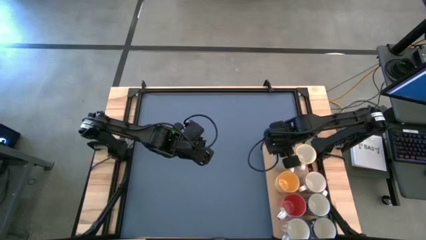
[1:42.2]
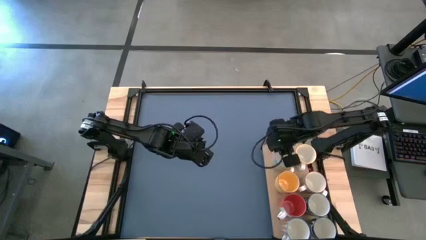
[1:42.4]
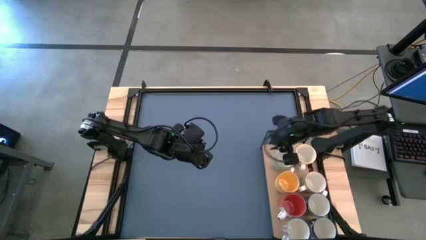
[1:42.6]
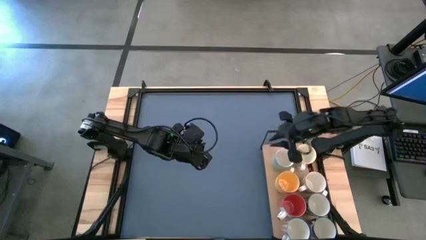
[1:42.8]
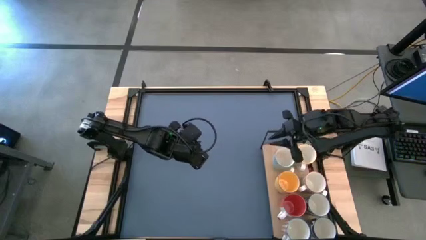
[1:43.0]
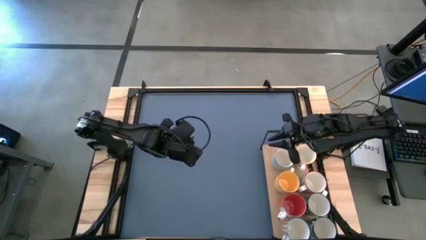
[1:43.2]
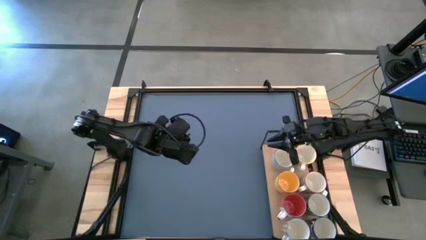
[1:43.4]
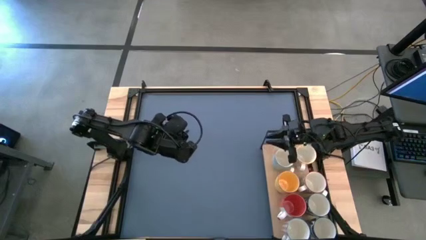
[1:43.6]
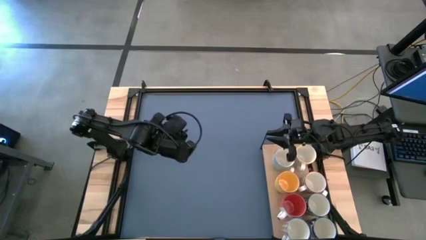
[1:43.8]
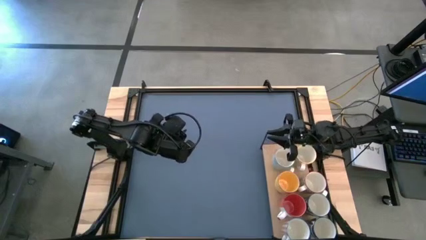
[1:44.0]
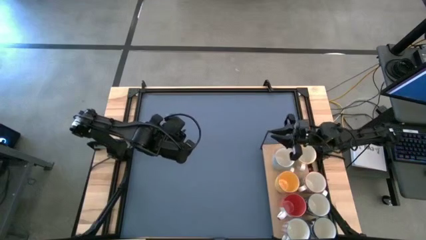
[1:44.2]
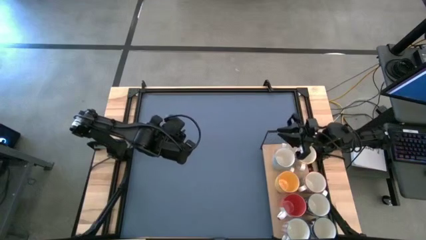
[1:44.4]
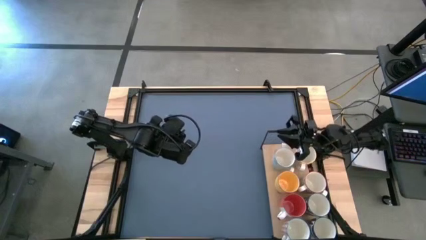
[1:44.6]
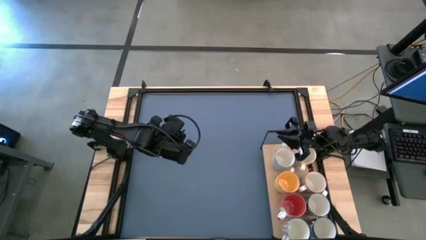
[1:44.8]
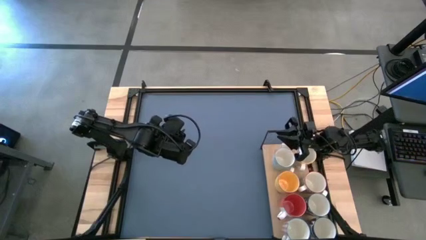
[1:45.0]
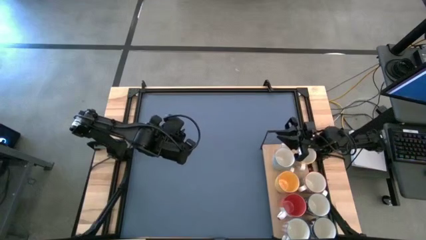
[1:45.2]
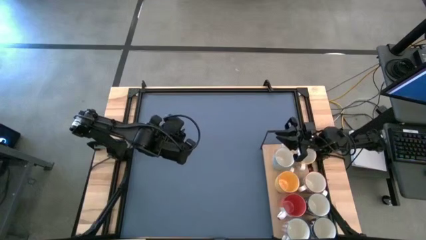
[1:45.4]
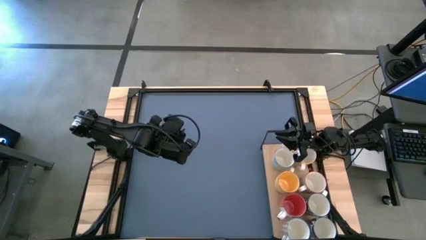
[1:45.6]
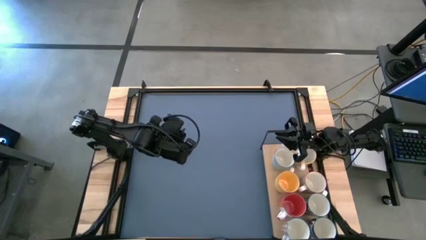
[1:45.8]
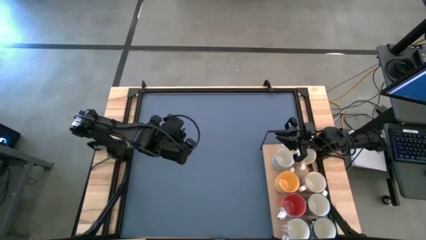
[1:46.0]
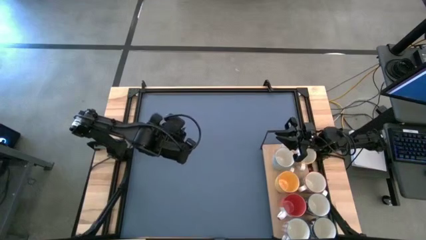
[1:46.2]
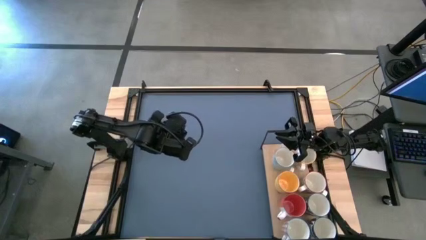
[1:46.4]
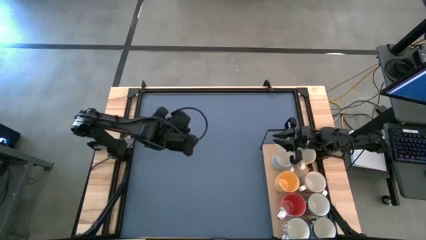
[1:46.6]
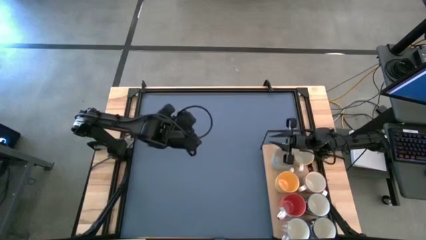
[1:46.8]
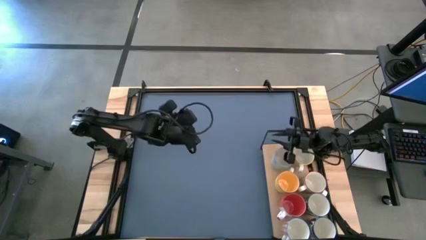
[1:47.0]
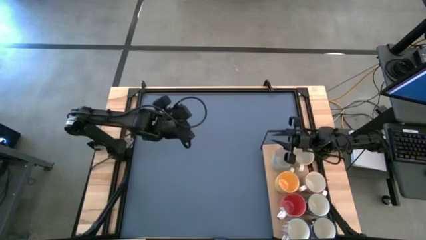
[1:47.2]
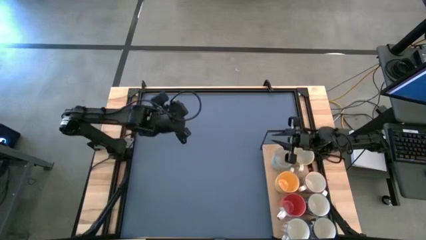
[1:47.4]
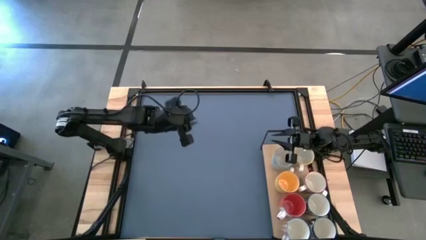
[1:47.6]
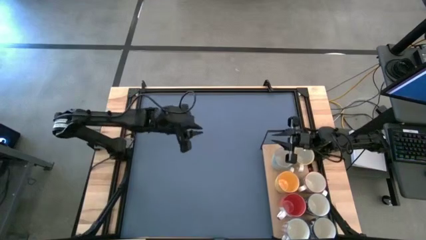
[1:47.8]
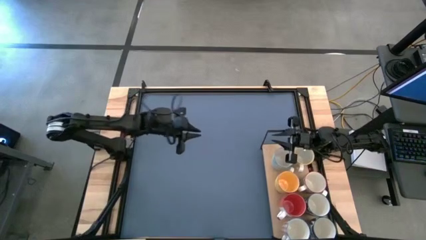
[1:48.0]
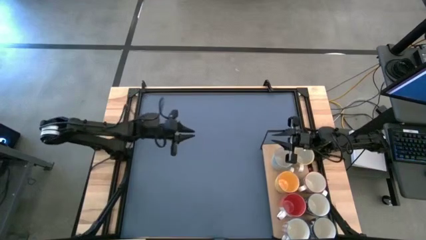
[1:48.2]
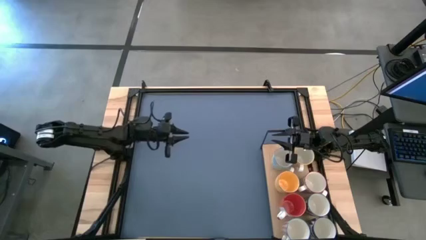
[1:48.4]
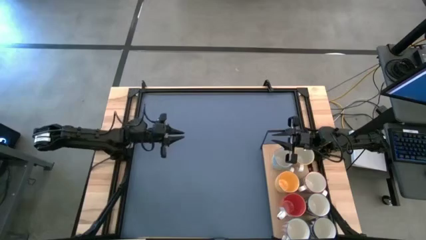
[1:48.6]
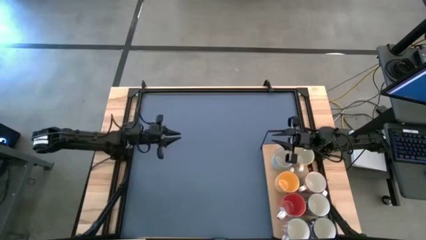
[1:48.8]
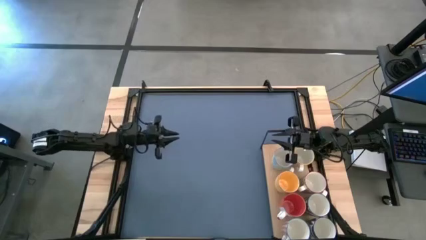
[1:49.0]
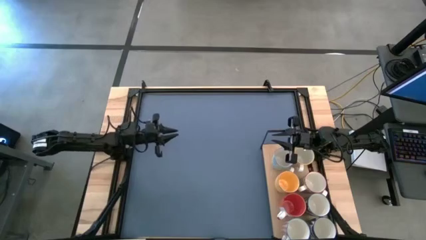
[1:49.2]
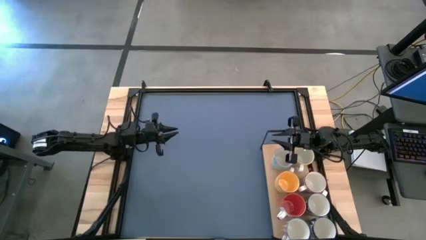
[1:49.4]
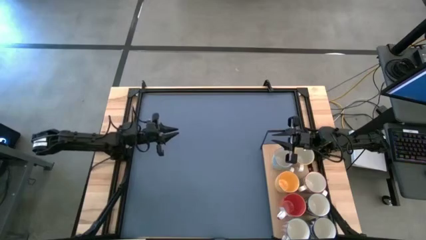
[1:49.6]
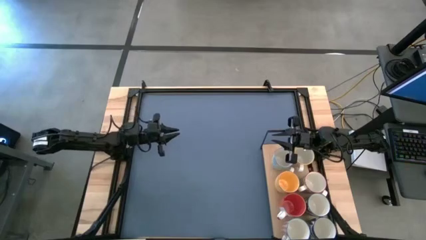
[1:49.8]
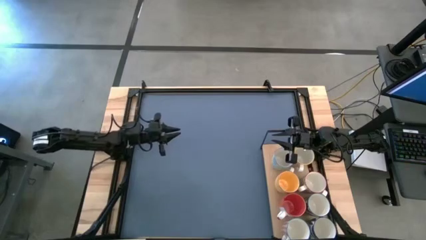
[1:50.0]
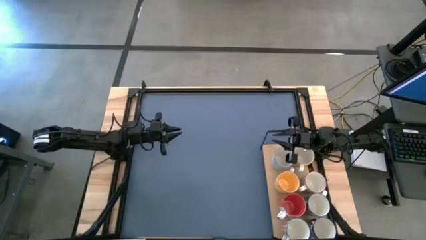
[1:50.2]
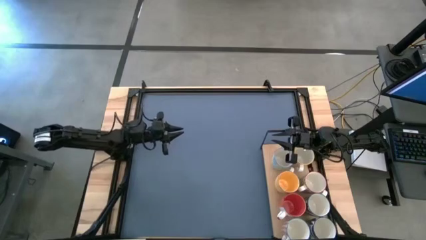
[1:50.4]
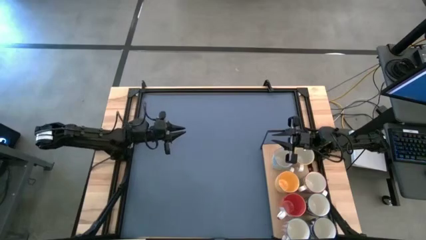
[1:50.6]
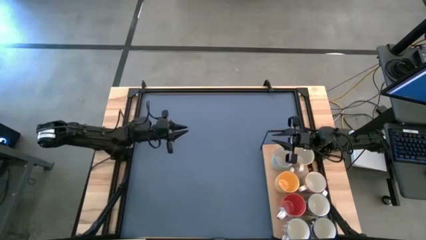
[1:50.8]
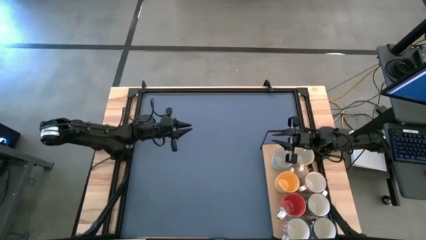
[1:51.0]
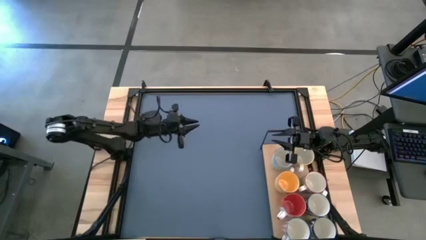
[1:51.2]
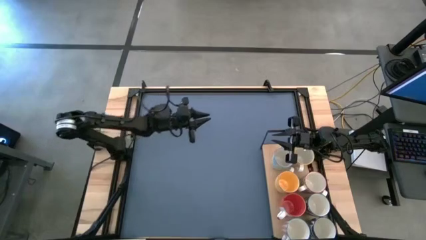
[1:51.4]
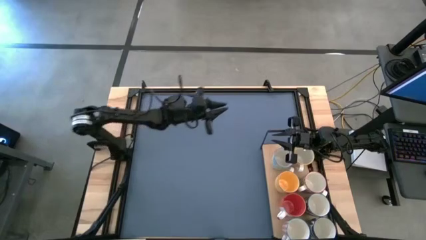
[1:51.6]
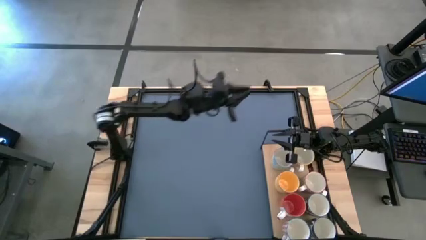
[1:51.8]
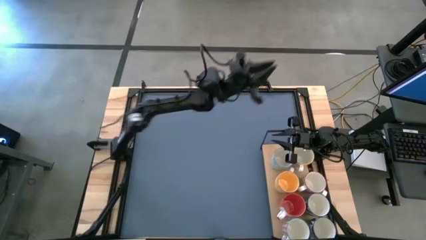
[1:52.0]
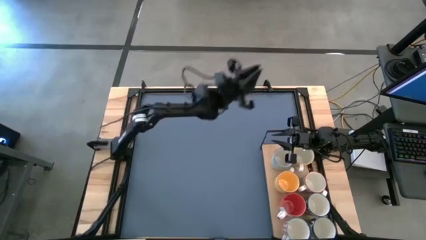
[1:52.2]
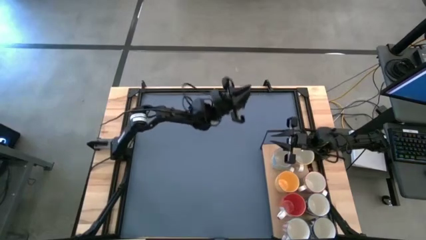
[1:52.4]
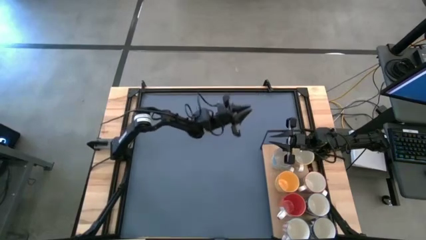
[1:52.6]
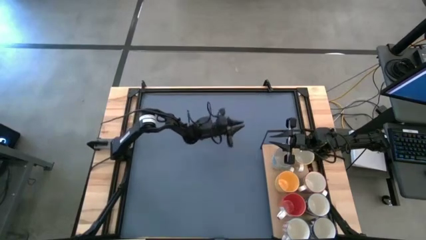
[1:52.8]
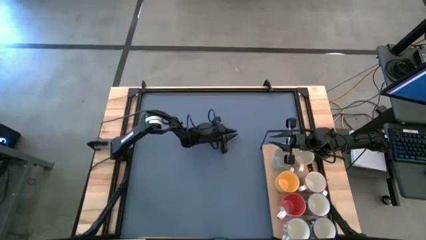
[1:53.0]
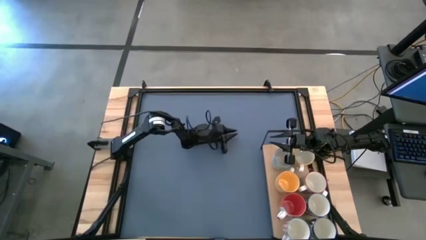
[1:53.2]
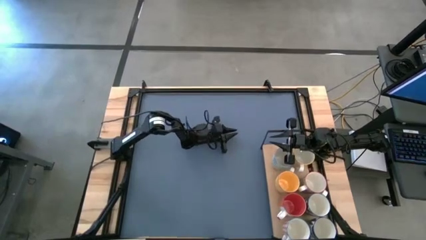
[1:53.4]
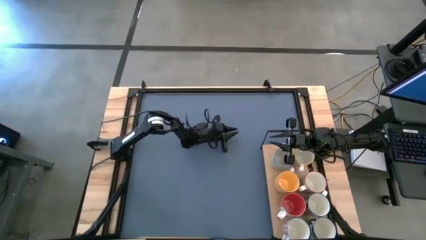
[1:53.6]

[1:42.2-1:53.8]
Task: Place coffee mugs
Return to Home Position

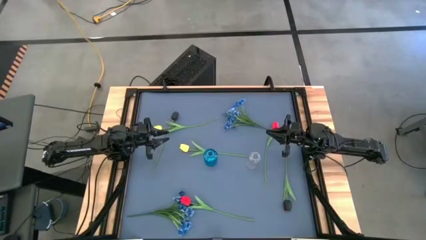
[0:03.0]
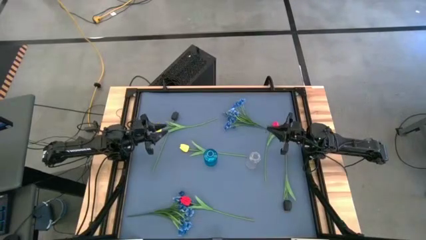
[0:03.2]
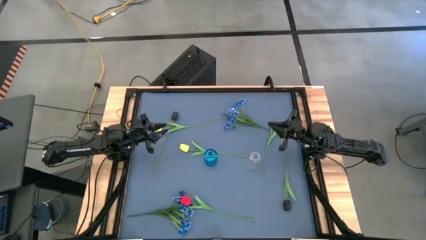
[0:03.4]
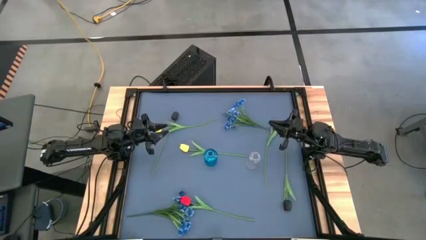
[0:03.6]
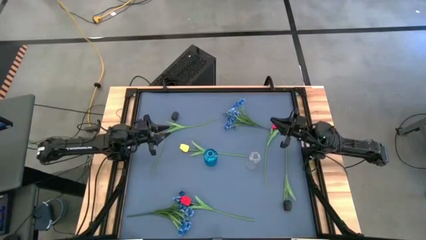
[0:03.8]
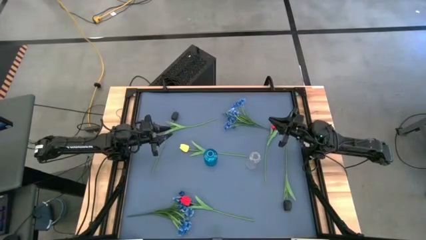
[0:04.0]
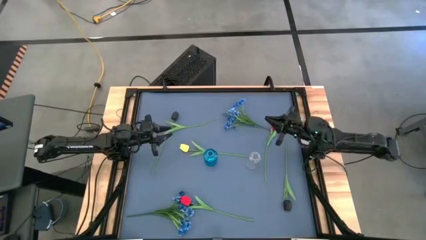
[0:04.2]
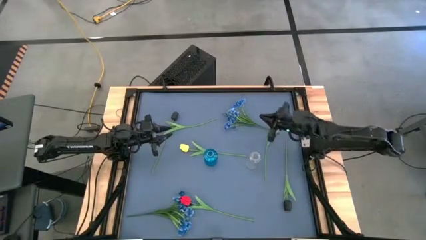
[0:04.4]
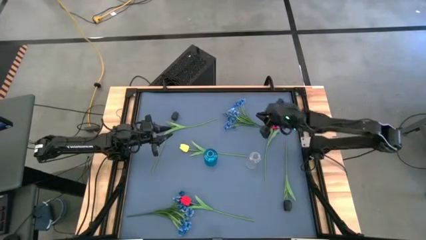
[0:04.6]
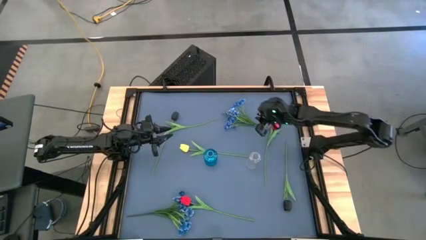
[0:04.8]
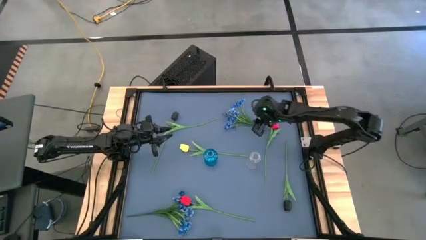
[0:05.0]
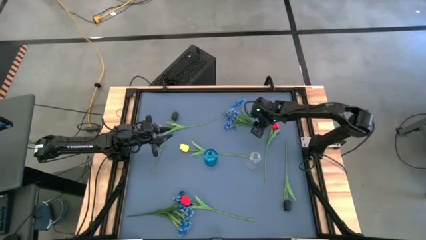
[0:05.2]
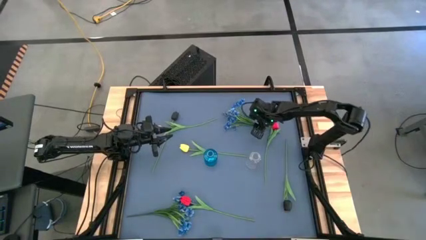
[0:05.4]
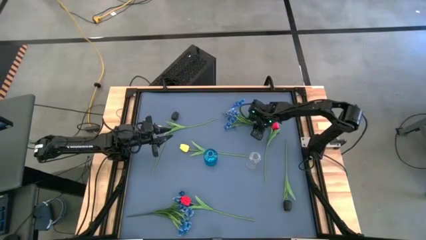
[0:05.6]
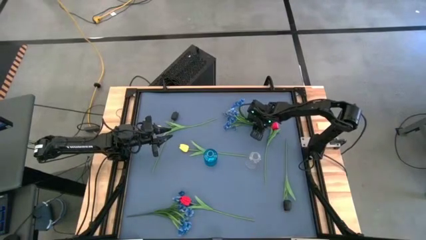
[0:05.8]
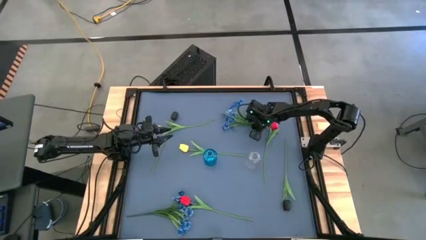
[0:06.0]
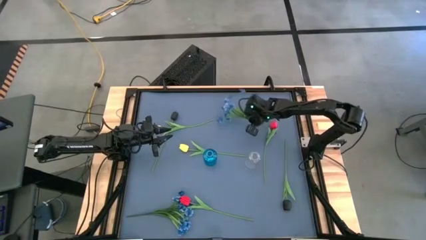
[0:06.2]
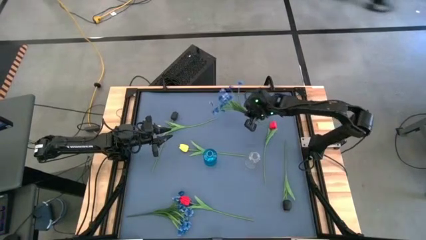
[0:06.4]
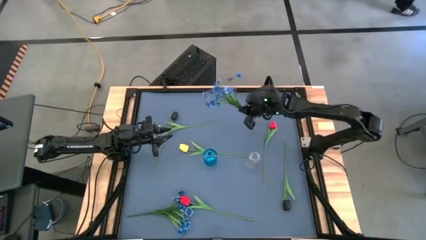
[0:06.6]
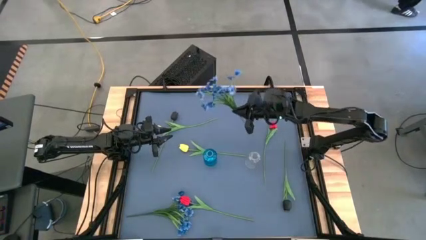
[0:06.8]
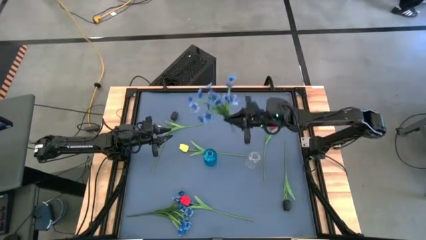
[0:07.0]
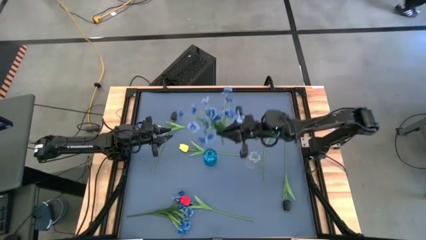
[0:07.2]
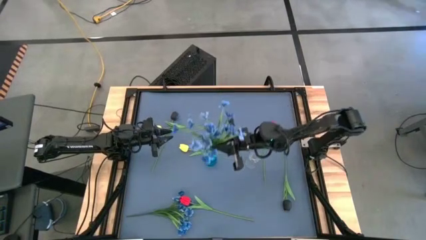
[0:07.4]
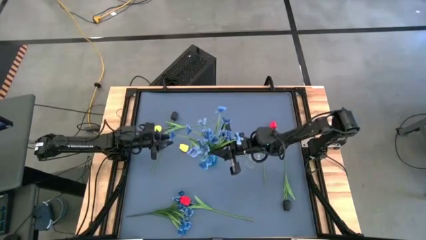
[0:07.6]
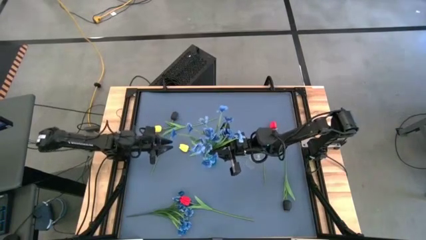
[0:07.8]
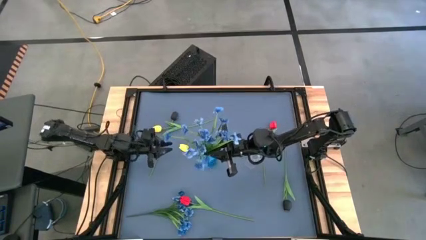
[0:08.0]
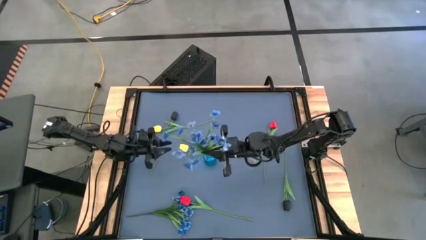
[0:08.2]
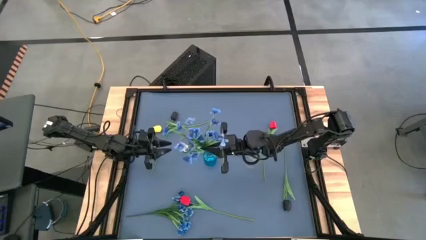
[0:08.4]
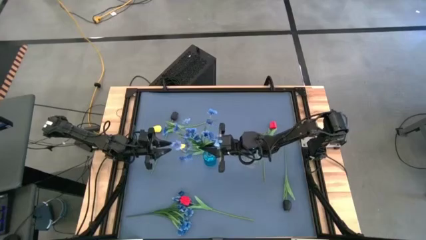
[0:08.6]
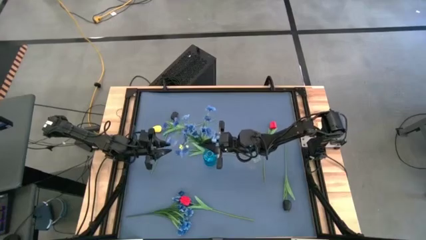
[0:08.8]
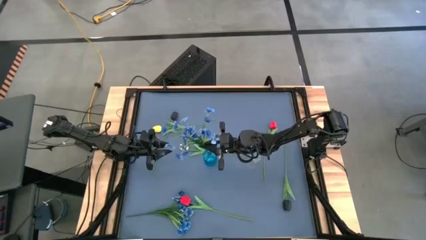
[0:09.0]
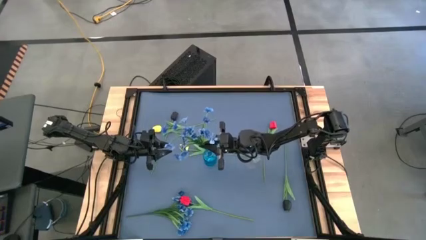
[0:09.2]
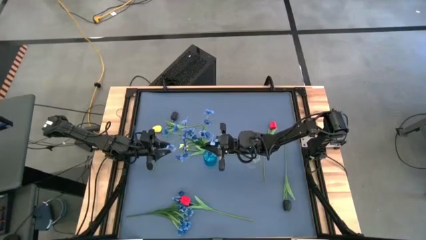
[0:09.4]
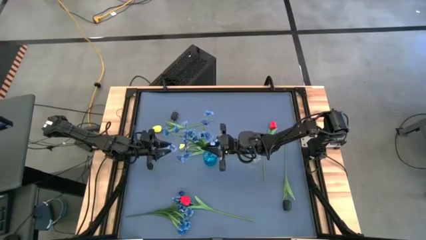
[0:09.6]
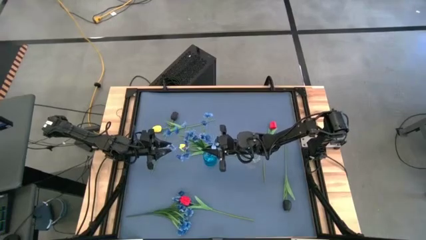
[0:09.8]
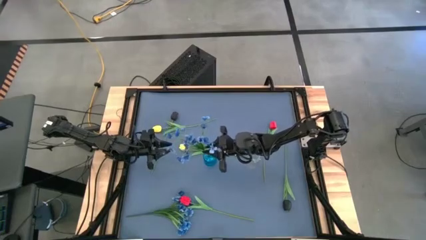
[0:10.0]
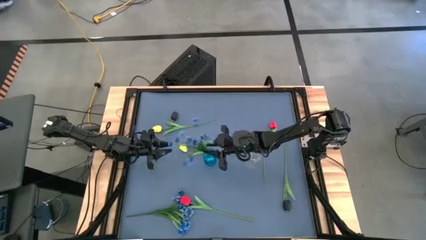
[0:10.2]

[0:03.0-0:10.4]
Task: Sort flowers into vase by color
Put the top blue flowers into the blue vase
